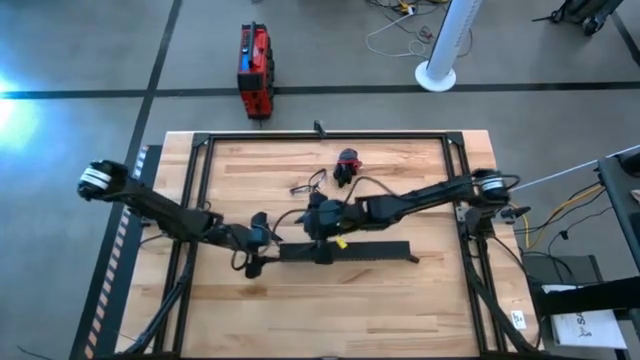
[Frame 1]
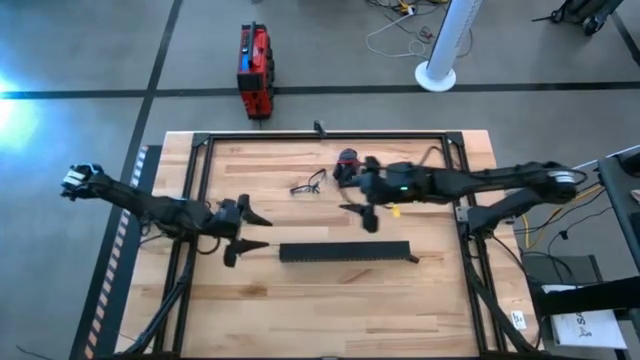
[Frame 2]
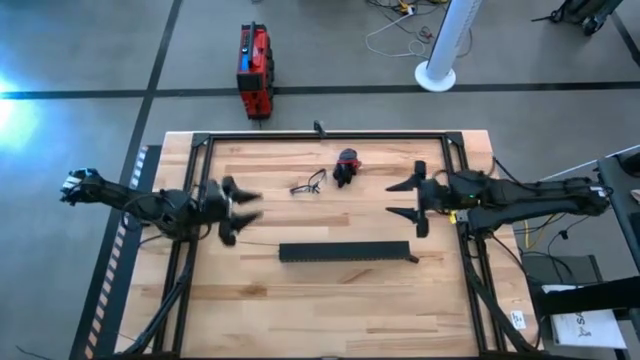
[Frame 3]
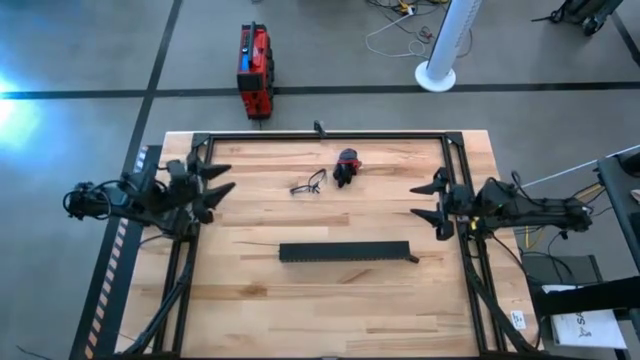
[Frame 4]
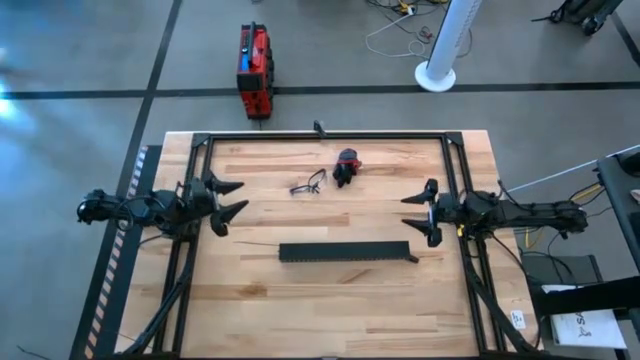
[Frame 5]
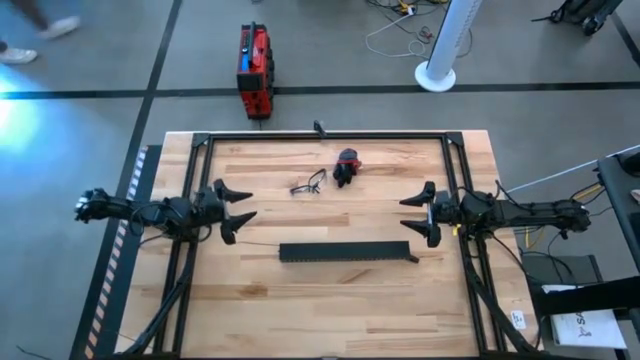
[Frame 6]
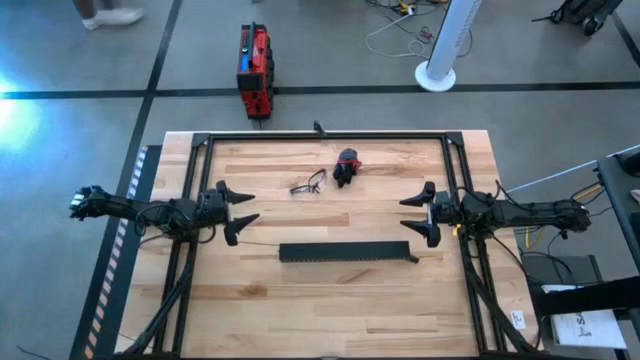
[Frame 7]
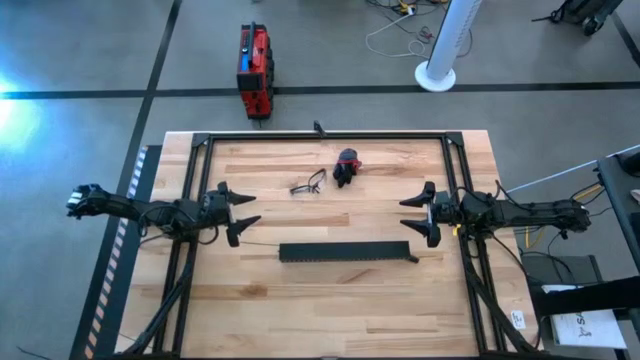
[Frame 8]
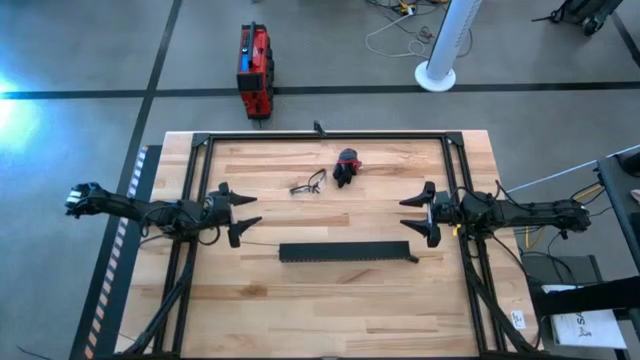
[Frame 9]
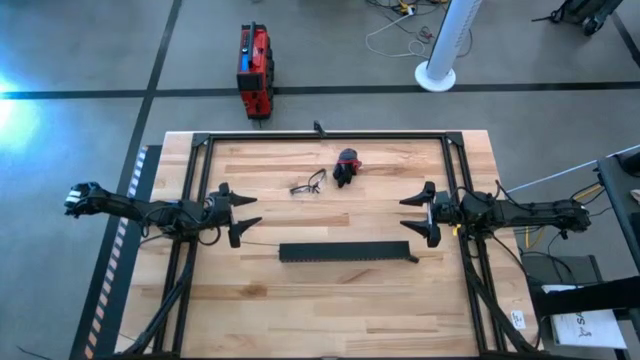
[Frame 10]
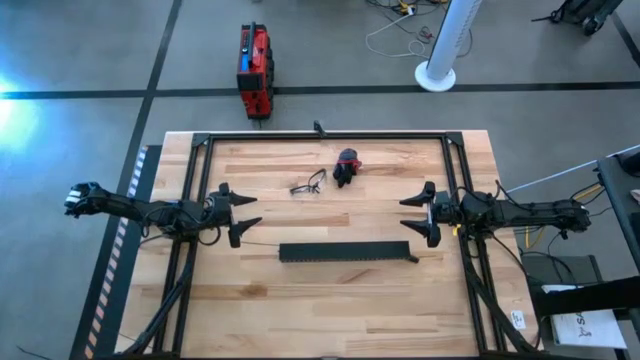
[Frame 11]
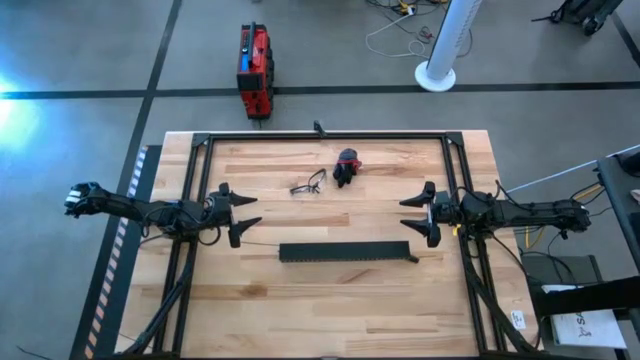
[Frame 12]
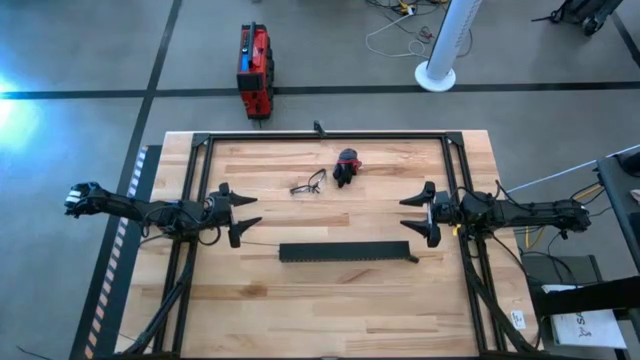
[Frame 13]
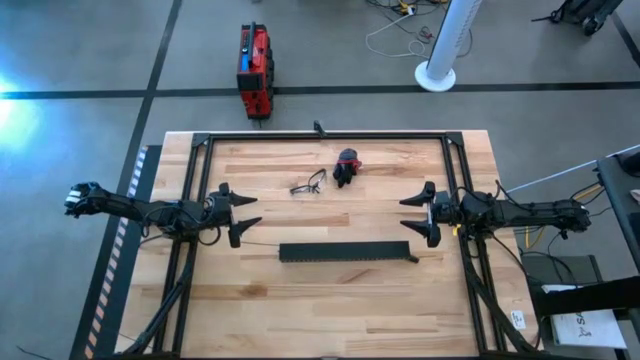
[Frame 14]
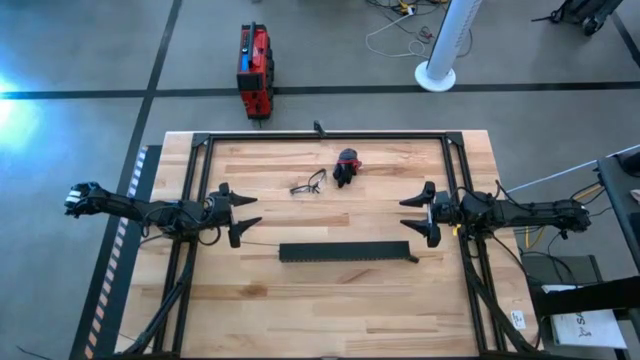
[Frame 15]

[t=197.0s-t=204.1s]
Task: Ziptie cables
Return to Home Position

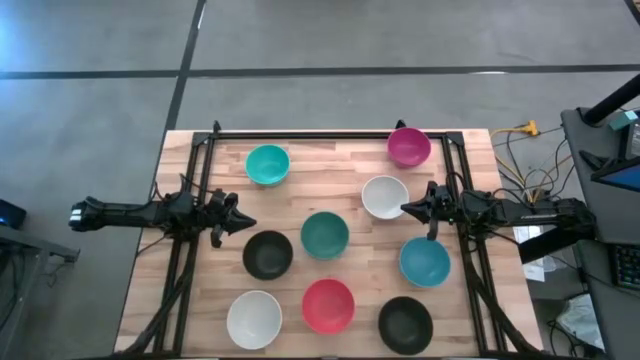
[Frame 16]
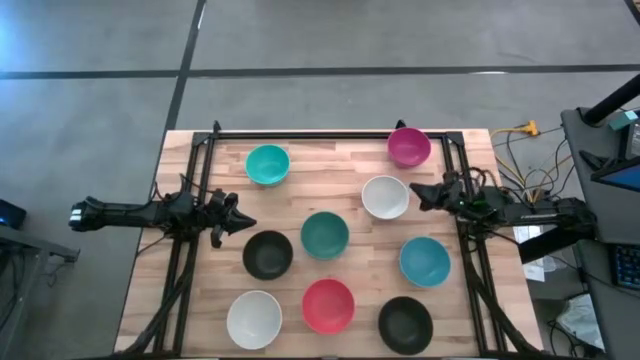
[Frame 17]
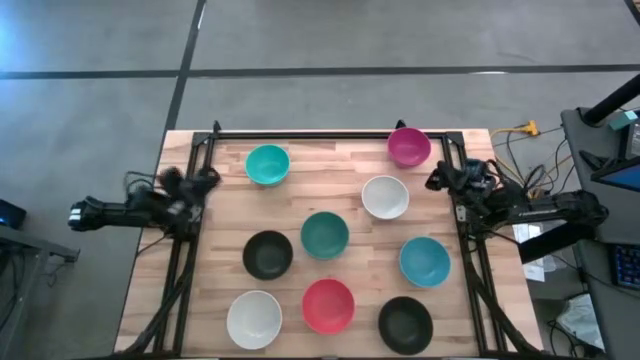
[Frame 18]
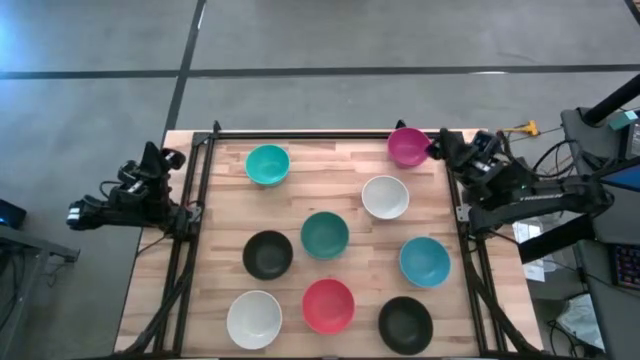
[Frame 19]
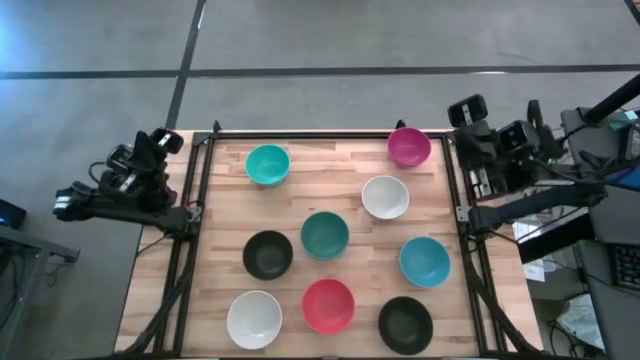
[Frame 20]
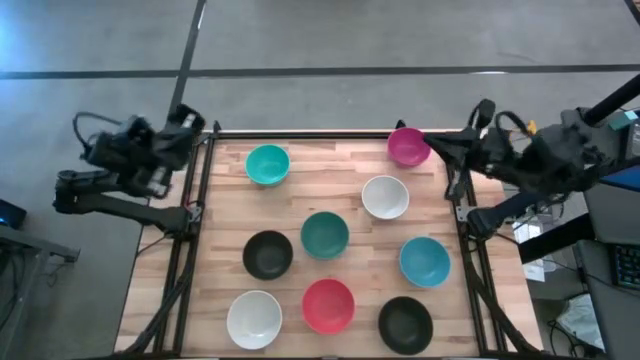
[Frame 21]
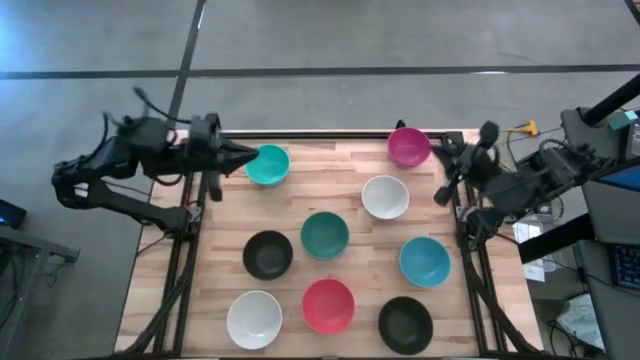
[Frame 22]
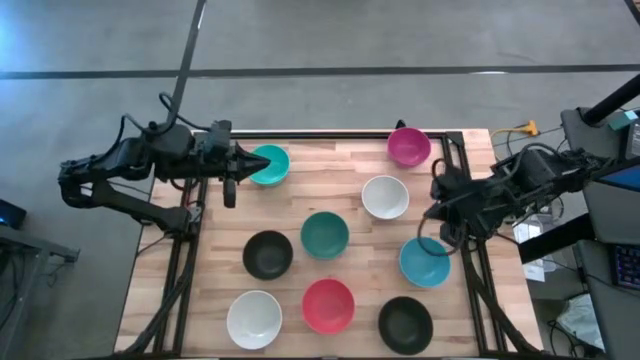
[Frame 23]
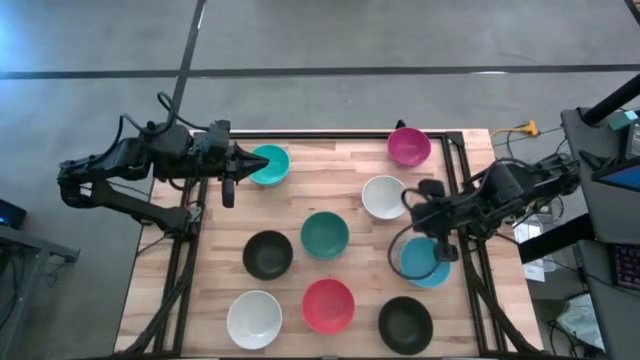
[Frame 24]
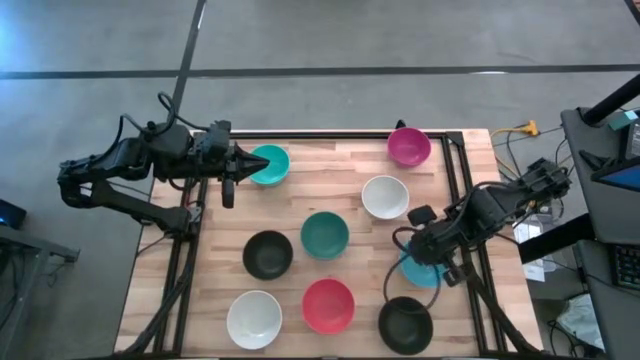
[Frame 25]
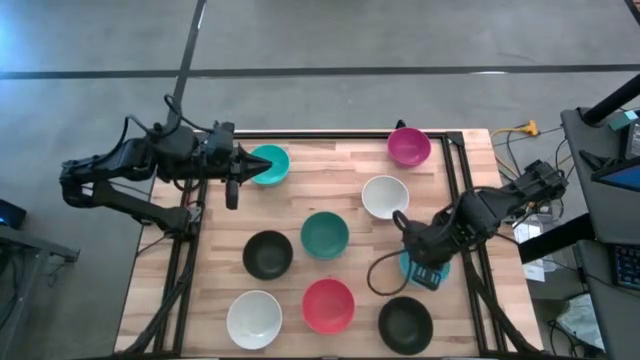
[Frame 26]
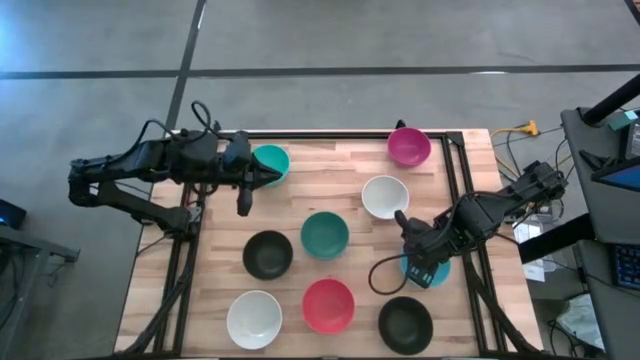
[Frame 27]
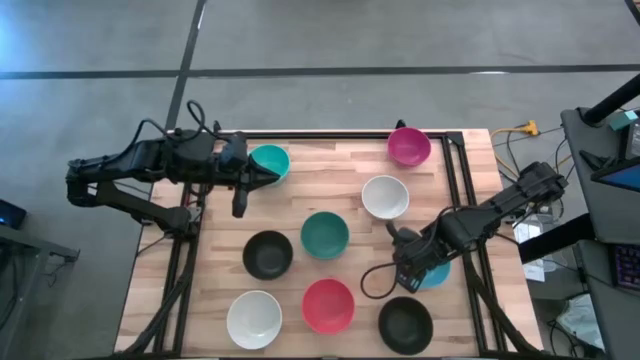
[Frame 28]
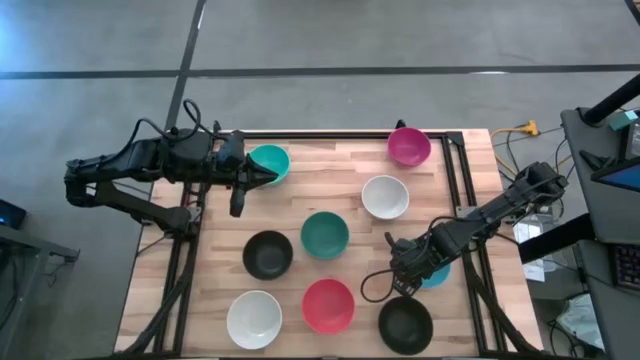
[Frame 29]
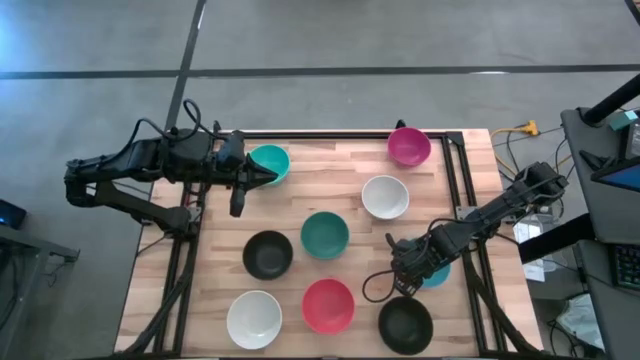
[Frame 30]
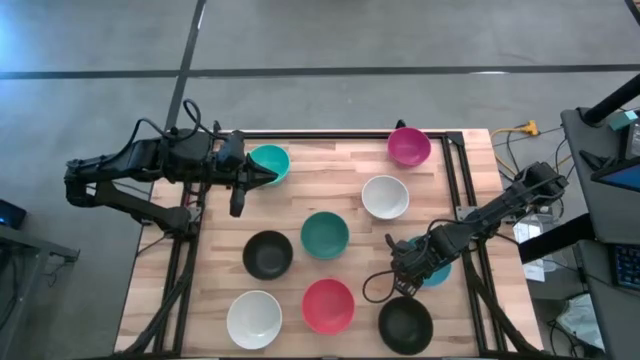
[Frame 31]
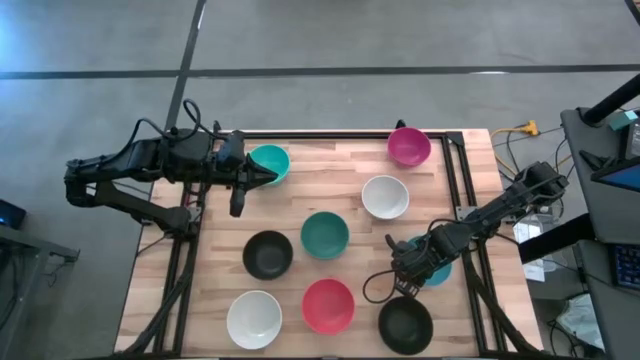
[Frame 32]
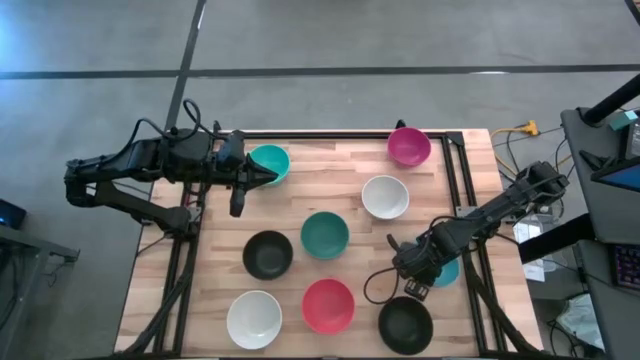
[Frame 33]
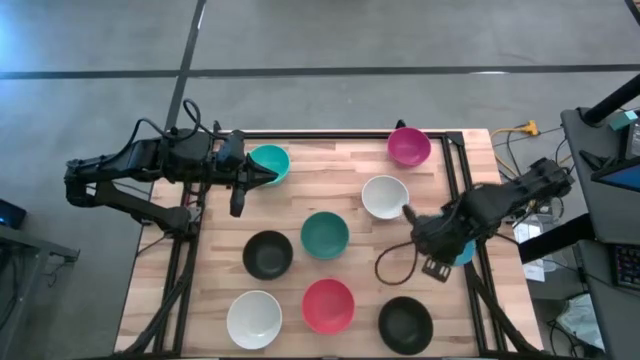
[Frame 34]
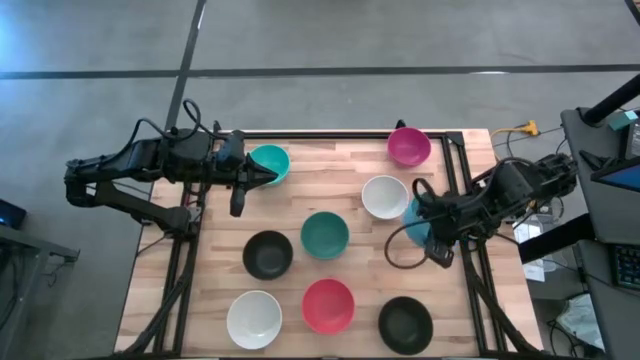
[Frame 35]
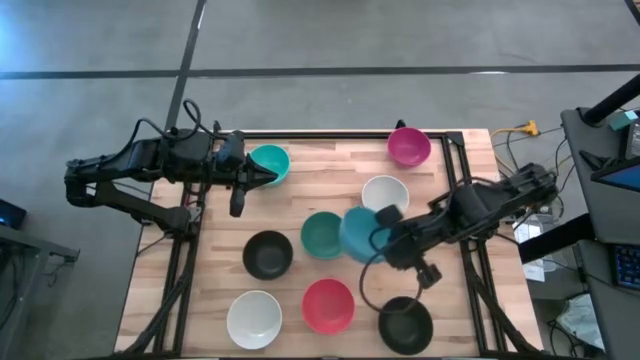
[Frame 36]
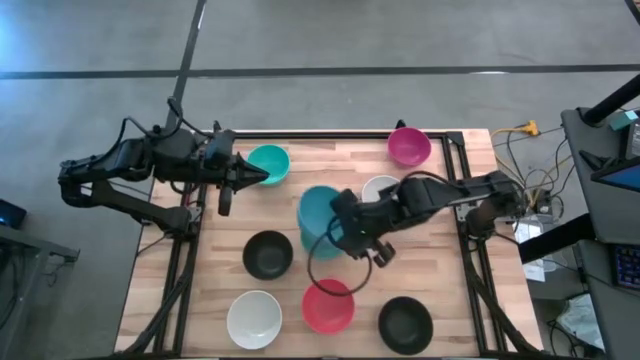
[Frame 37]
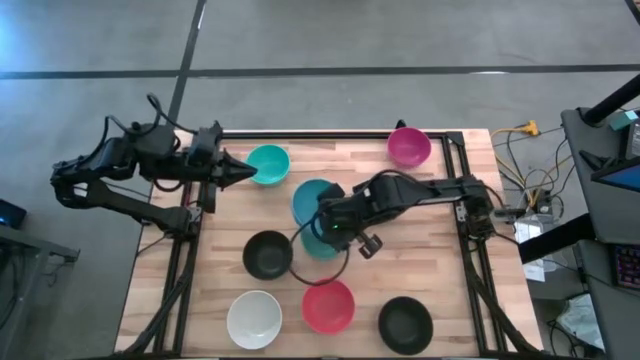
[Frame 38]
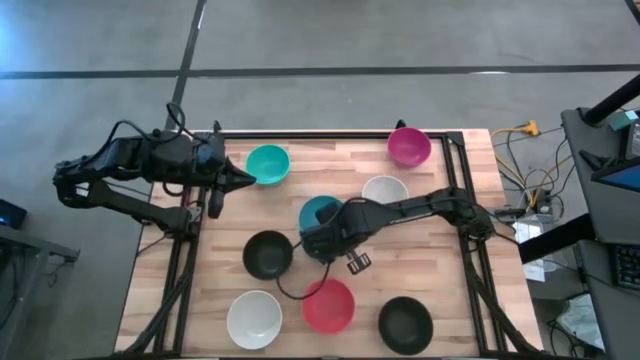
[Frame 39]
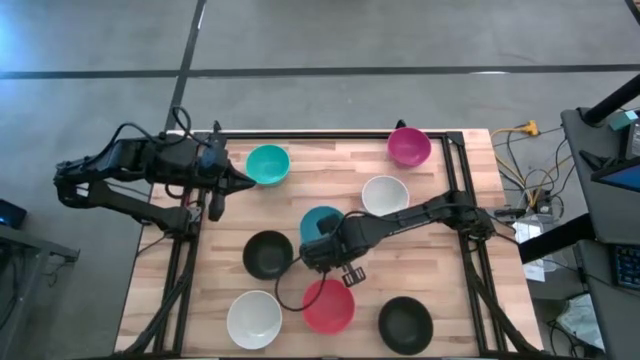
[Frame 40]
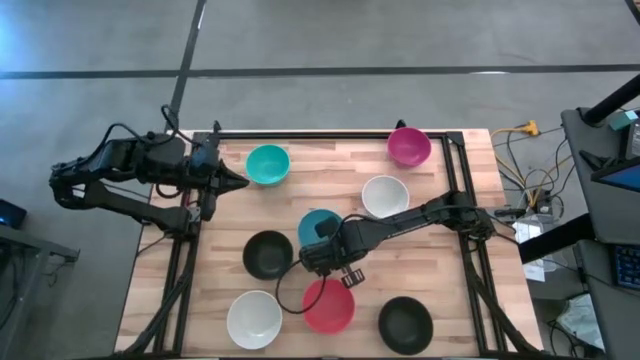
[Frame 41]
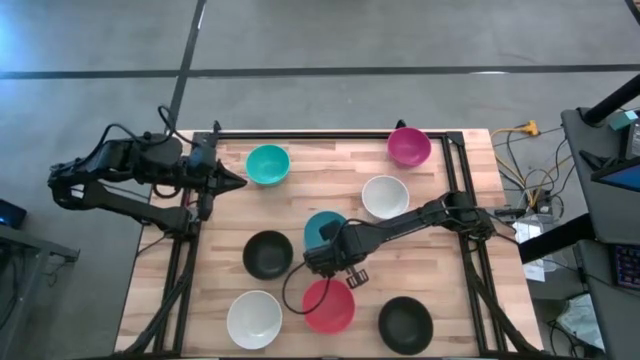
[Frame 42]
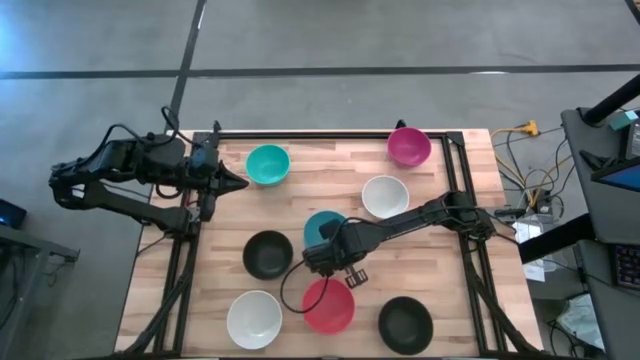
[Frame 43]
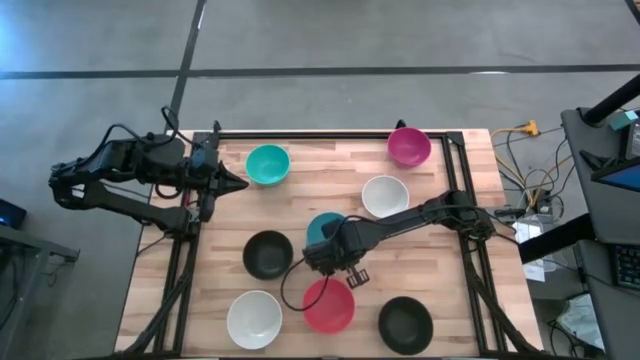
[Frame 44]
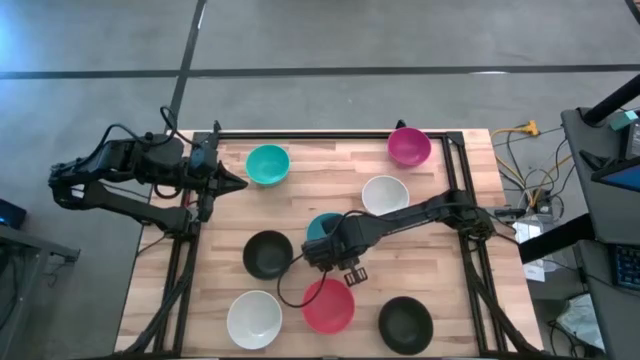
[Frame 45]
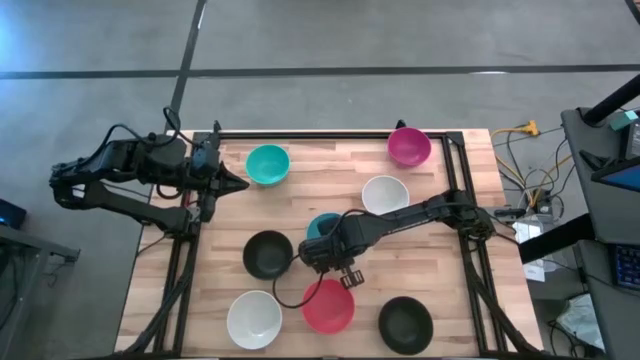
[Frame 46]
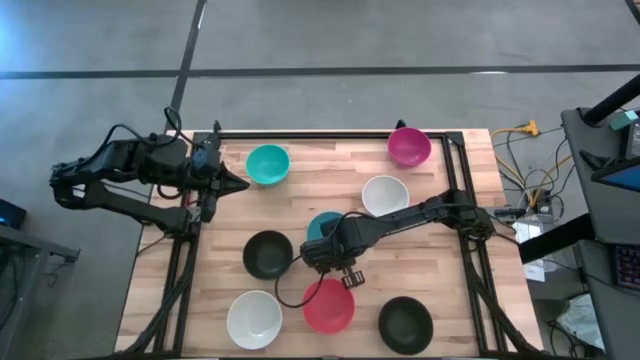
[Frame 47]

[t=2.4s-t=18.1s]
Task: Nest bowls inside each other
Stack the blue bowl on top of the green bowl
